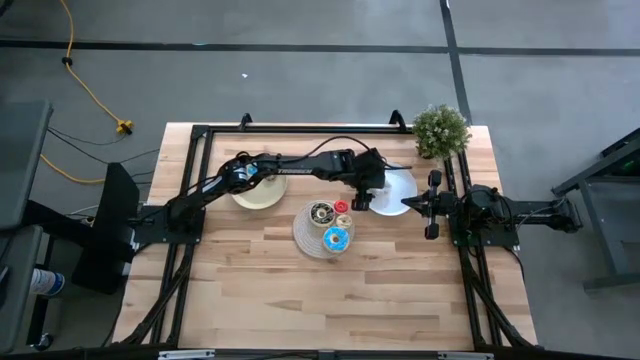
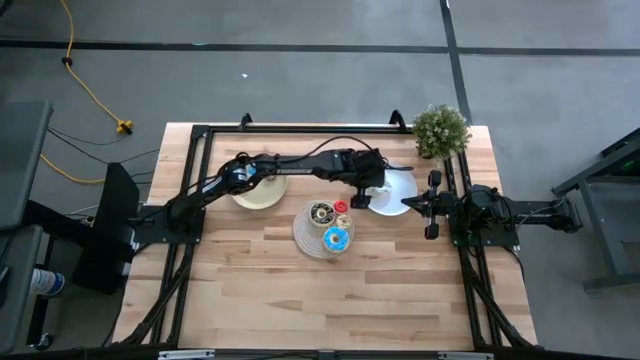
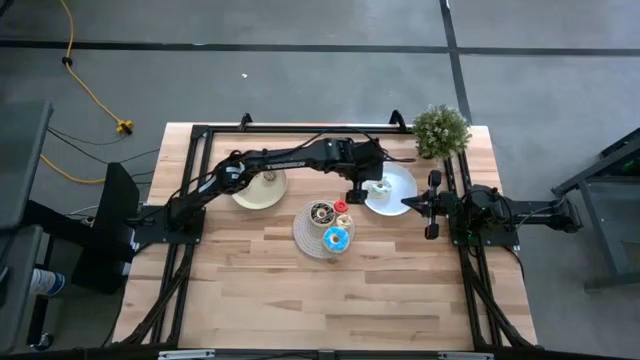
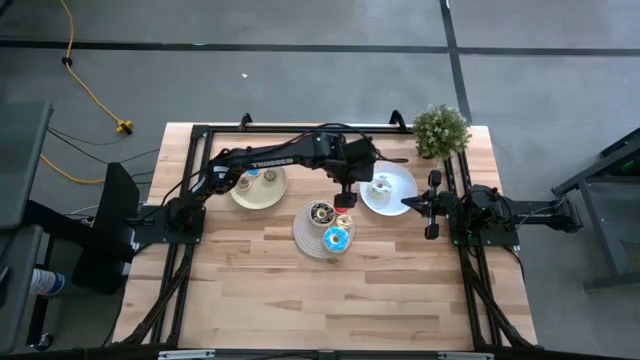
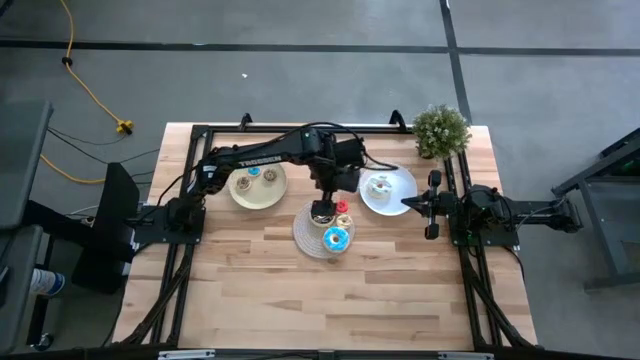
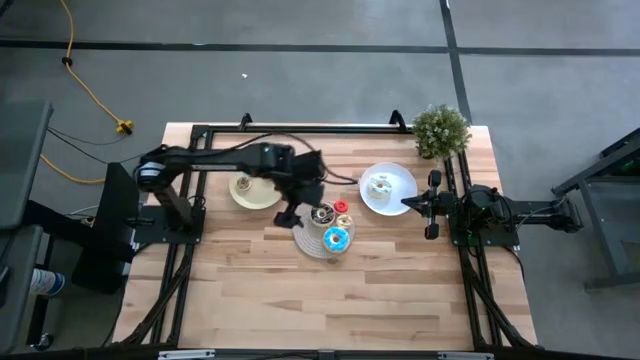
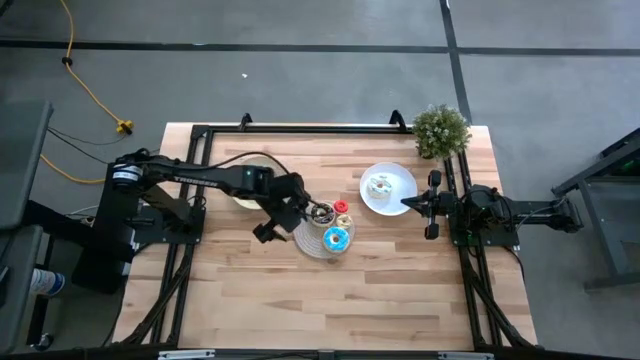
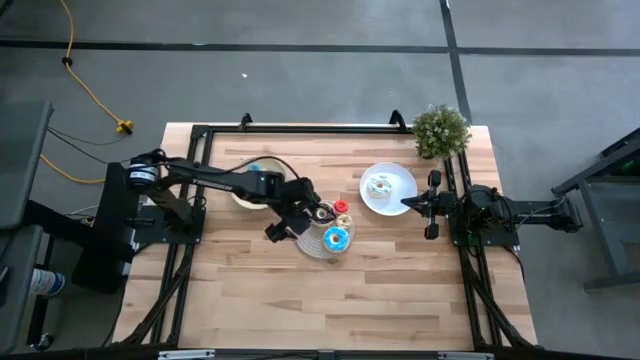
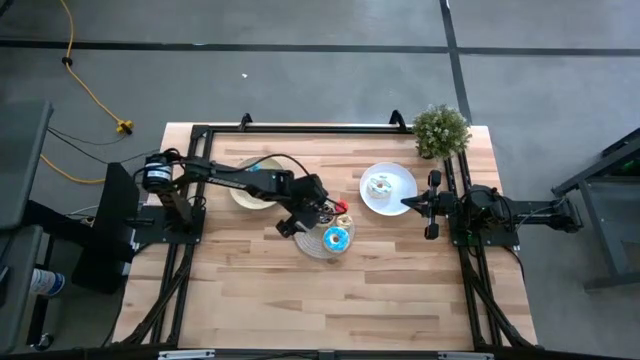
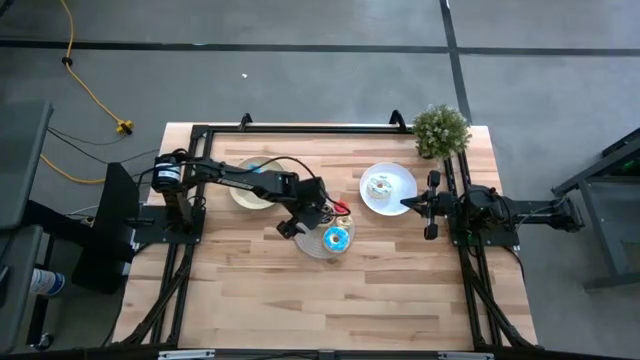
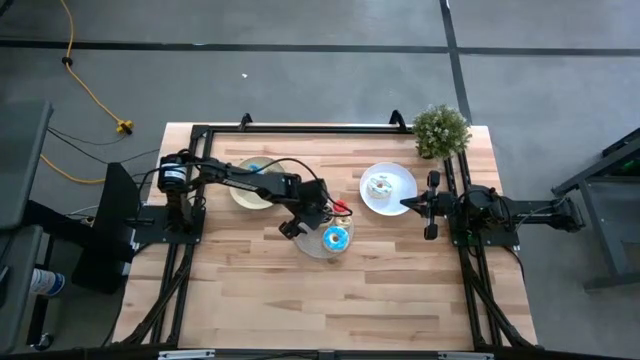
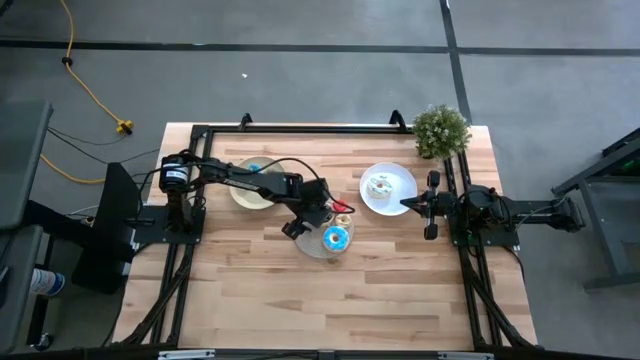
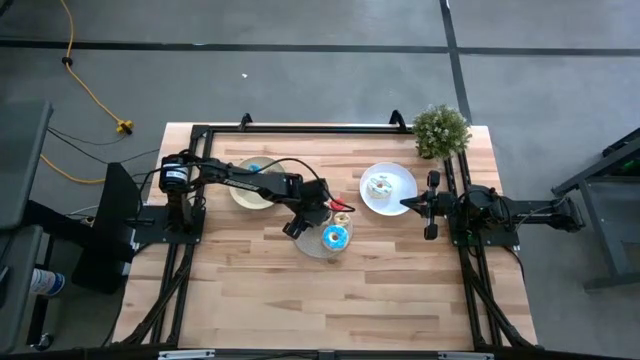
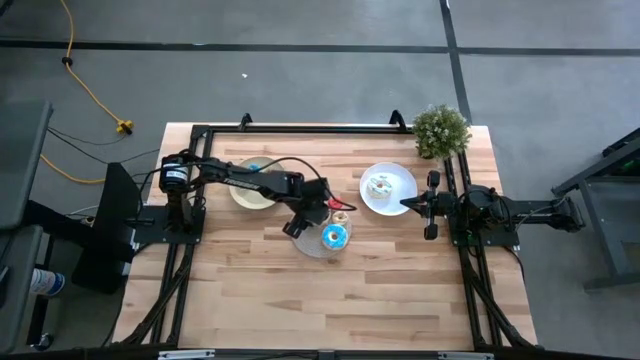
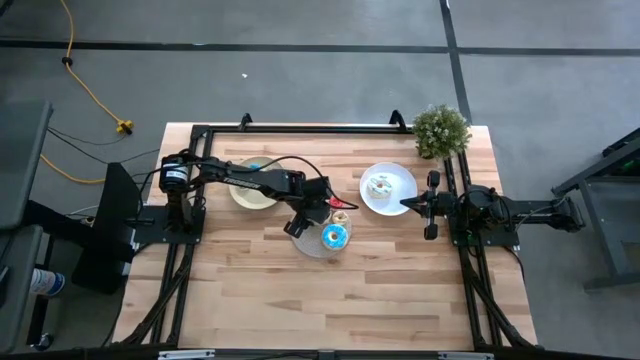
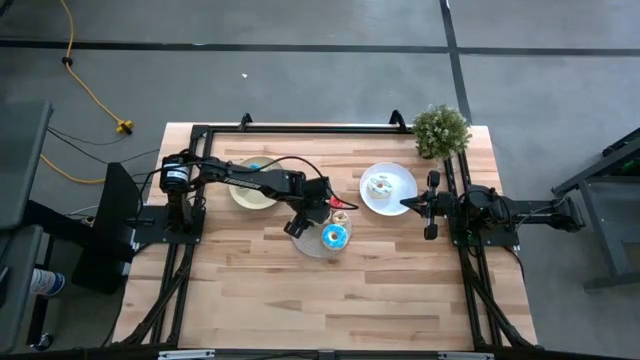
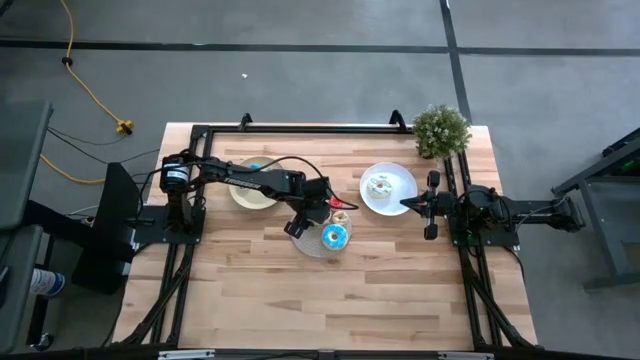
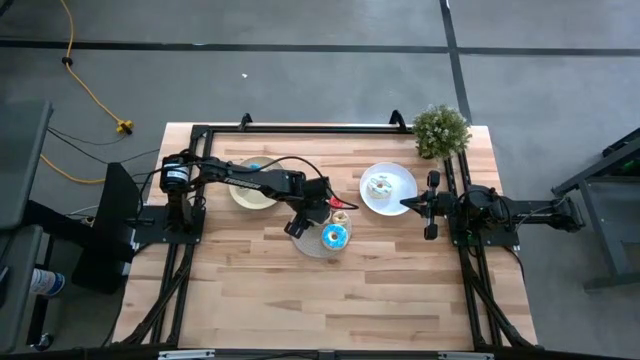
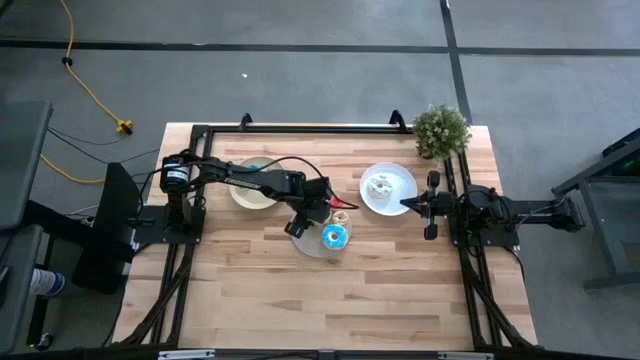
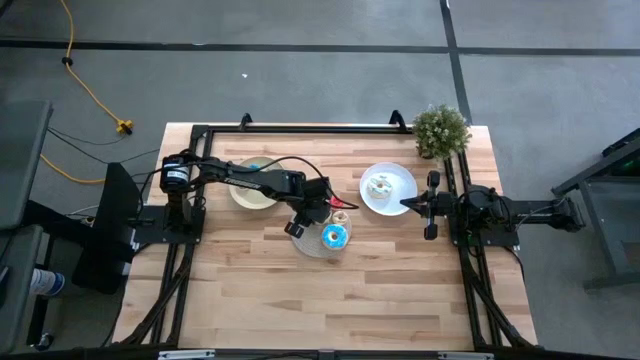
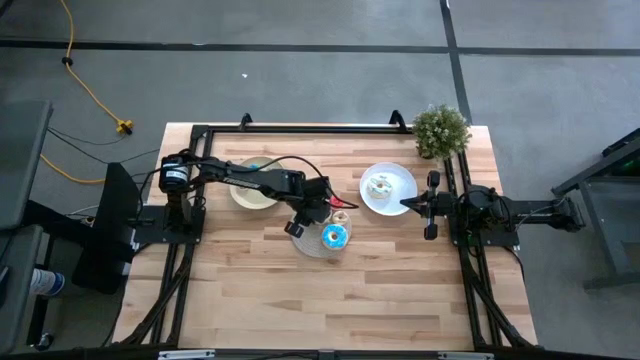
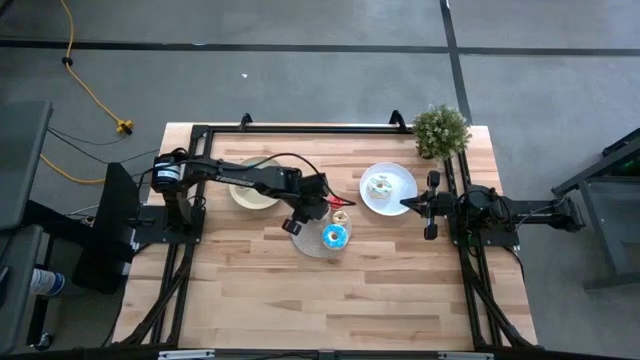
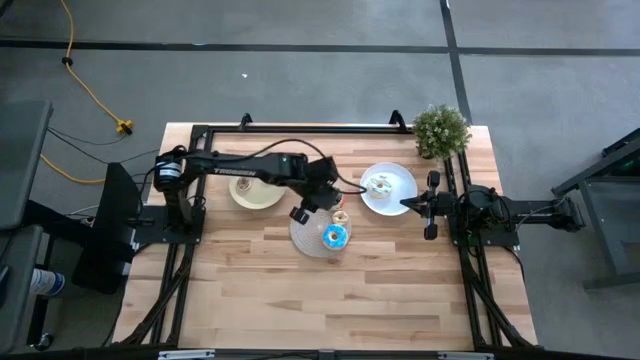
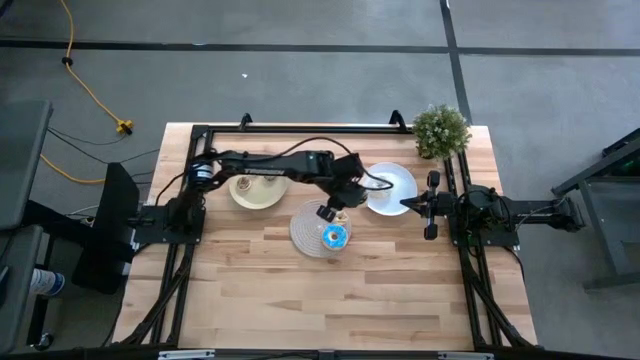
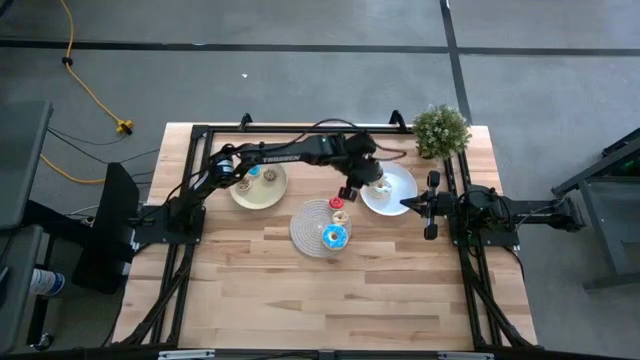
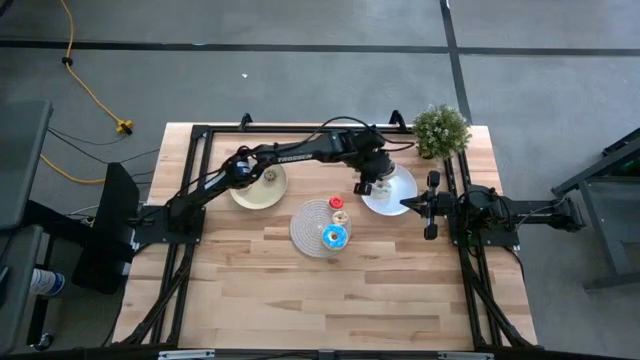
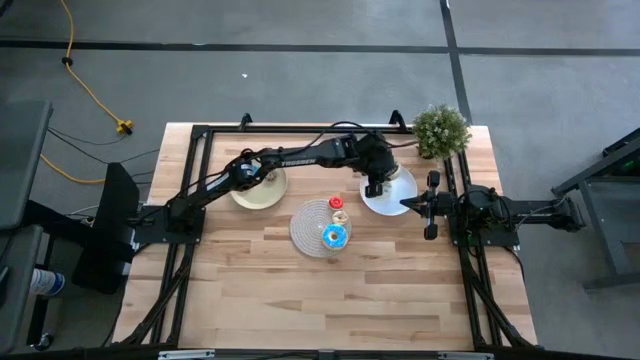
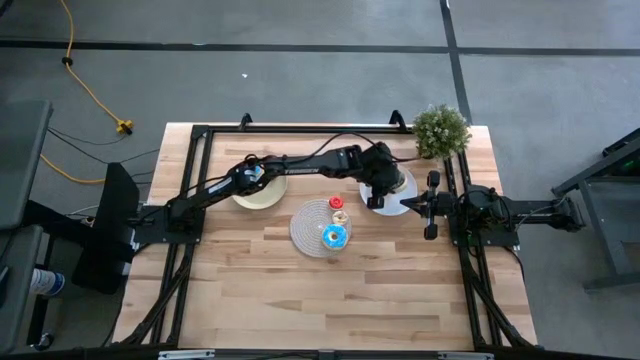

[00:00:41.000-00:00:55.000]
Task: Pick & Place donuts
Put the large black donut on the white plate

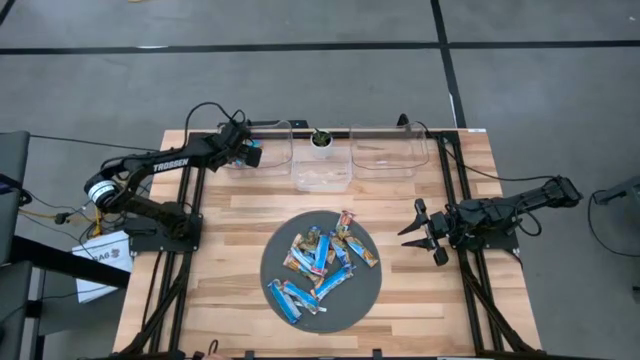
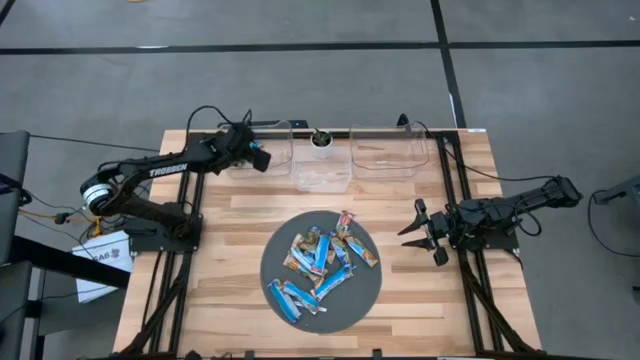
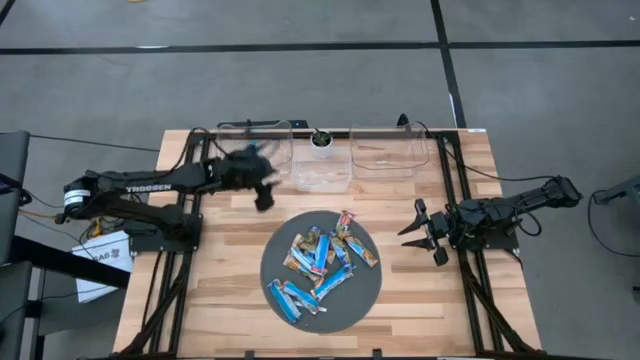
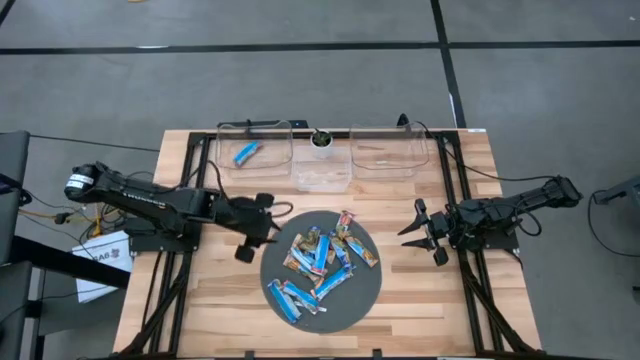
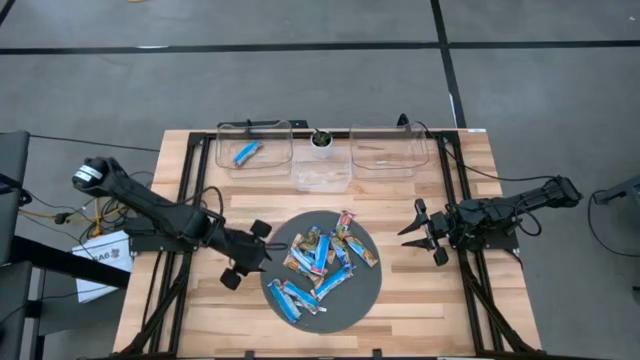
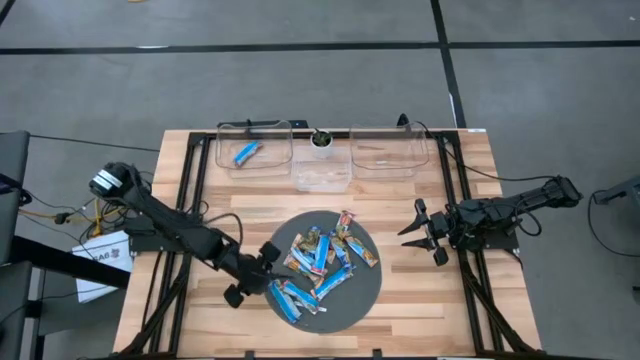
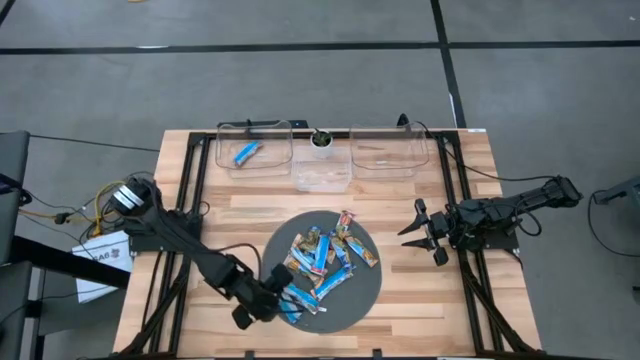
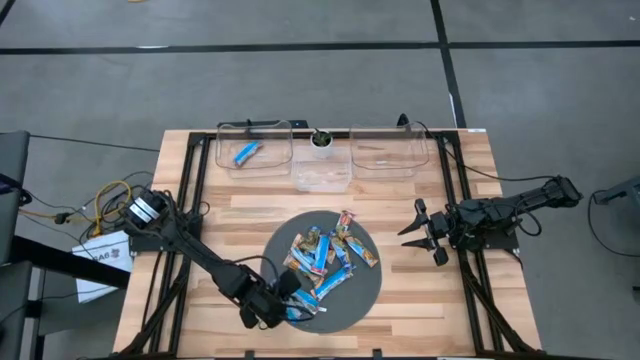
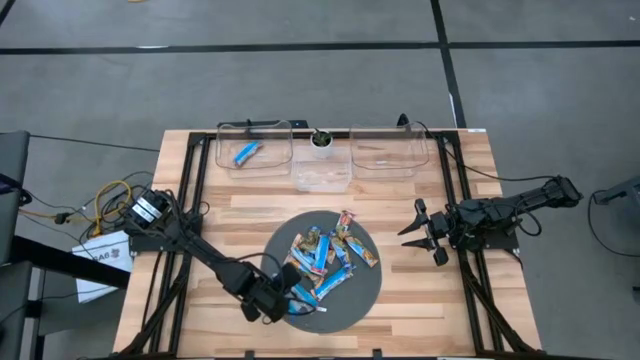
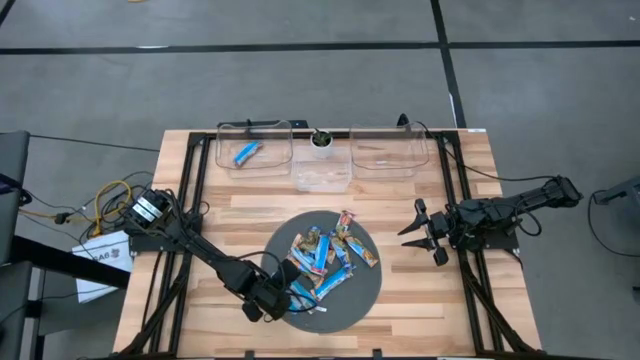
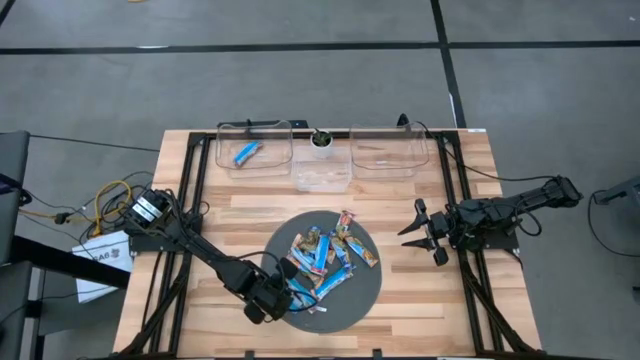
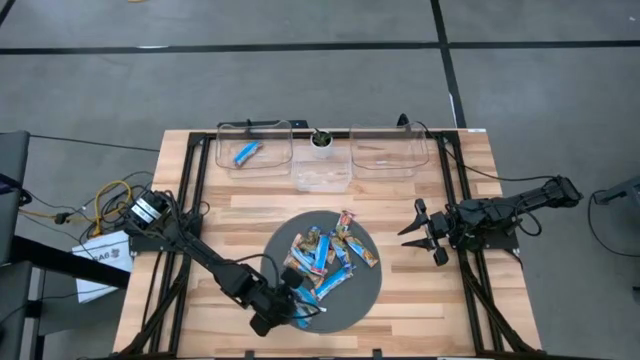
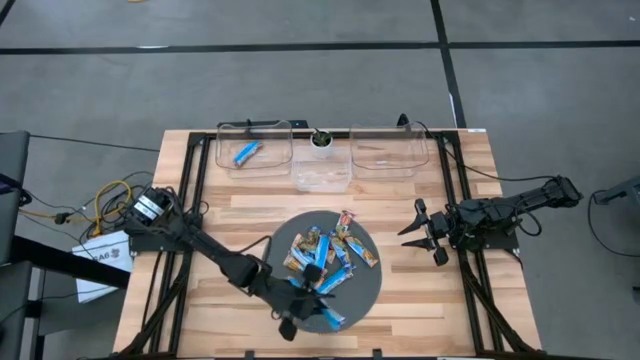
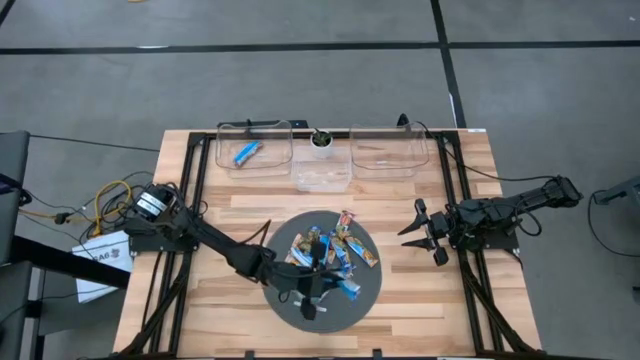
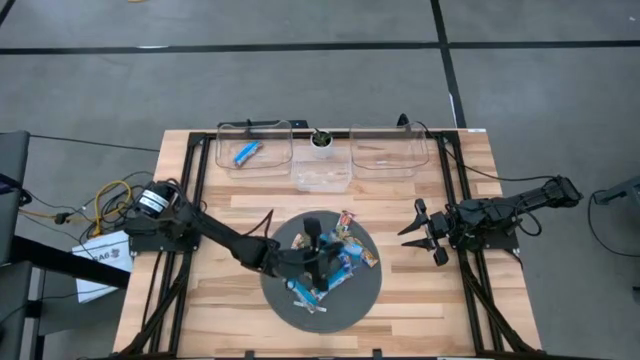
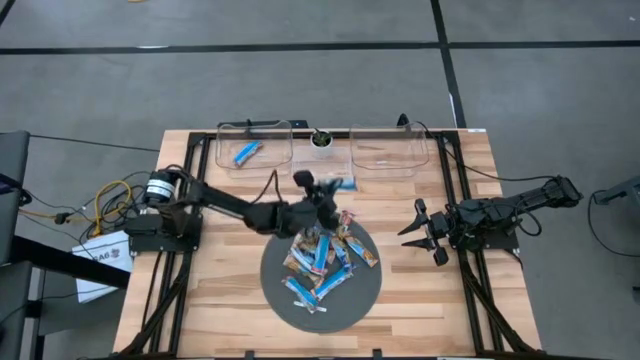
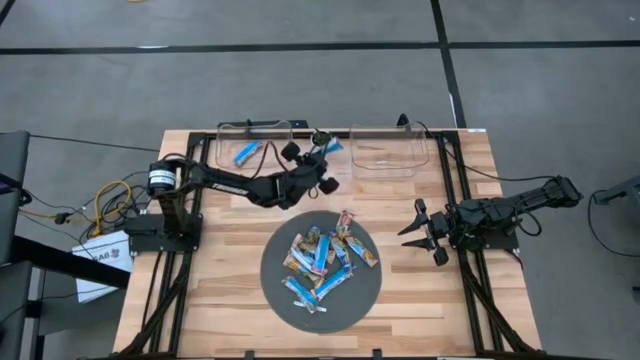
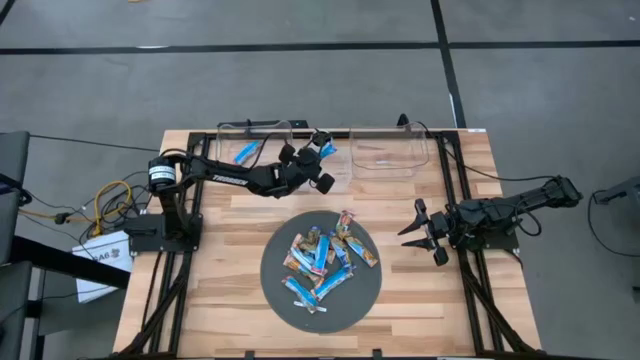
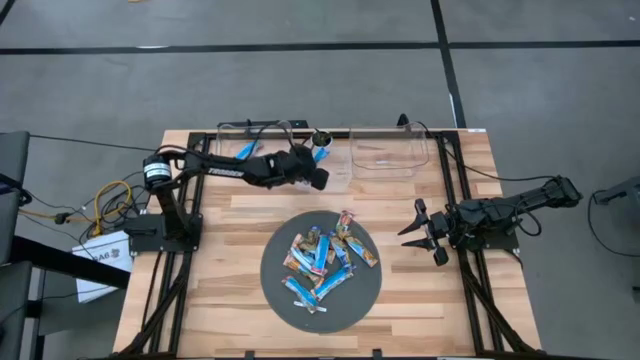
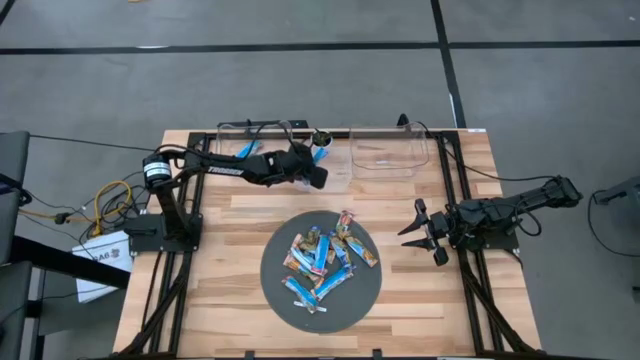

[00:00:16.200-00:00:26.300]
Task: Pick and place Granola Bars by type
Put the blue granola bar into the white bin
